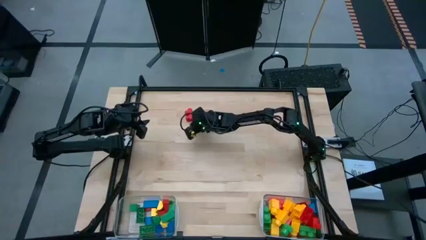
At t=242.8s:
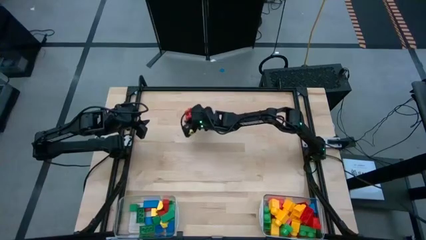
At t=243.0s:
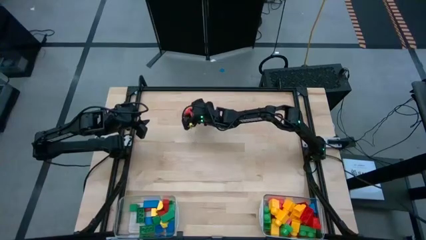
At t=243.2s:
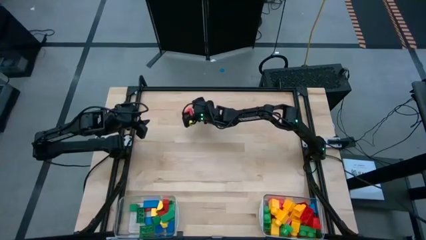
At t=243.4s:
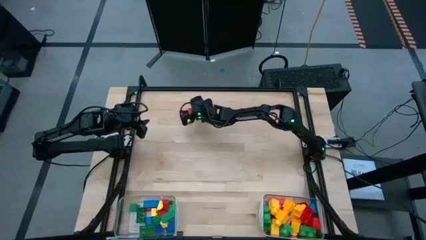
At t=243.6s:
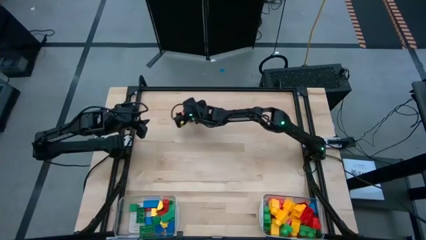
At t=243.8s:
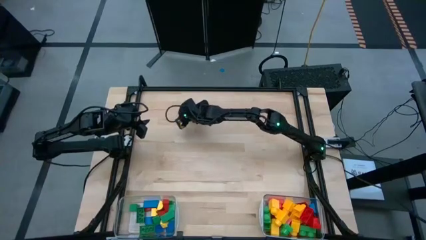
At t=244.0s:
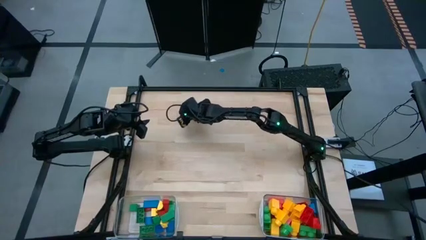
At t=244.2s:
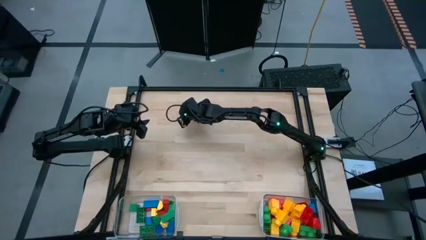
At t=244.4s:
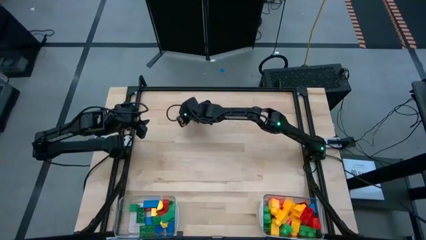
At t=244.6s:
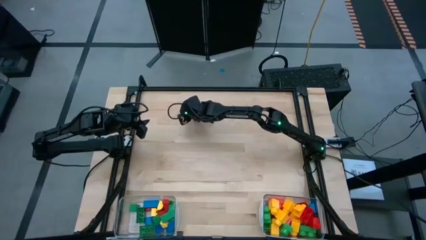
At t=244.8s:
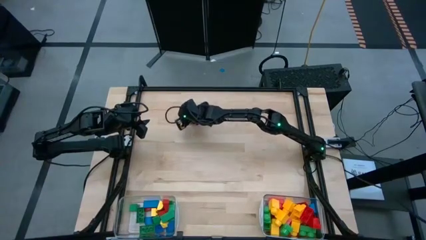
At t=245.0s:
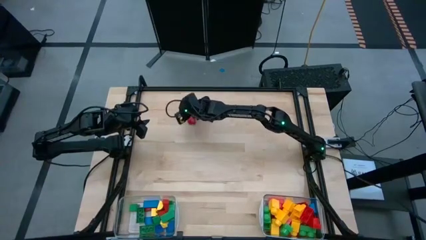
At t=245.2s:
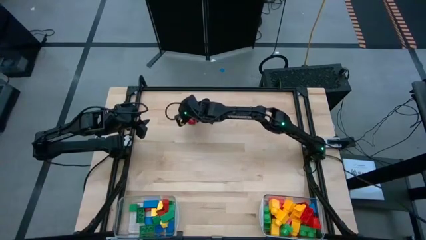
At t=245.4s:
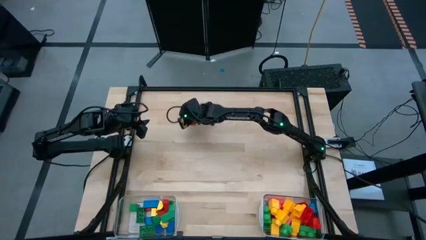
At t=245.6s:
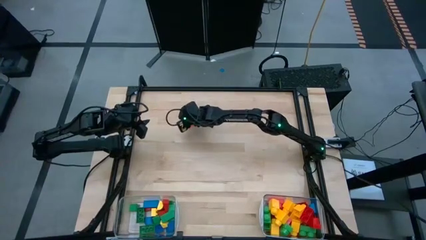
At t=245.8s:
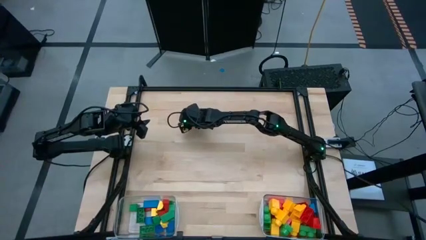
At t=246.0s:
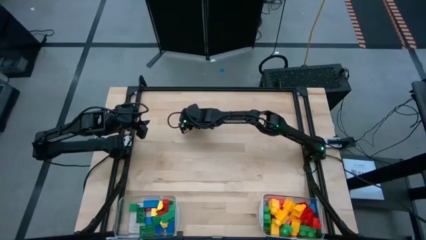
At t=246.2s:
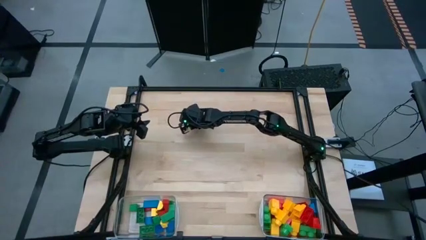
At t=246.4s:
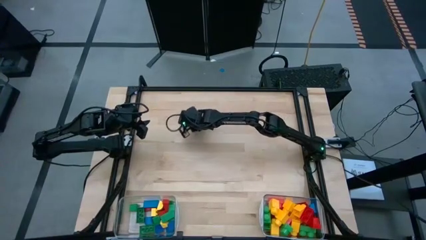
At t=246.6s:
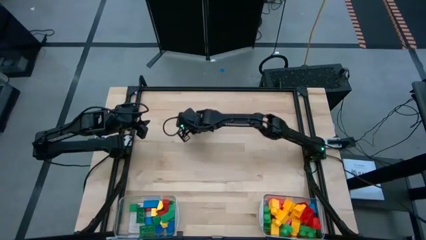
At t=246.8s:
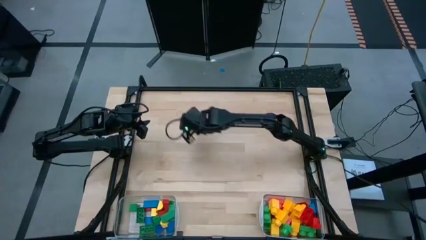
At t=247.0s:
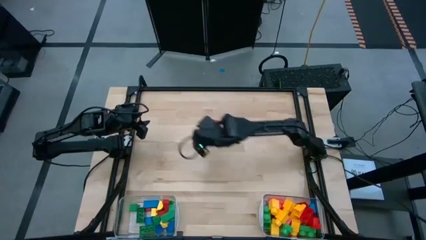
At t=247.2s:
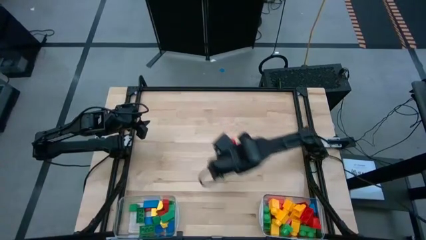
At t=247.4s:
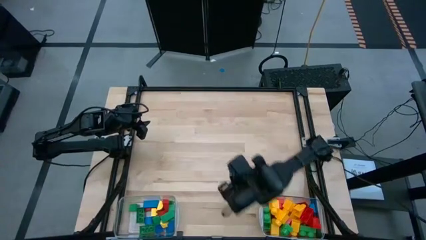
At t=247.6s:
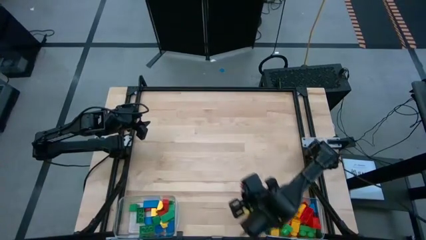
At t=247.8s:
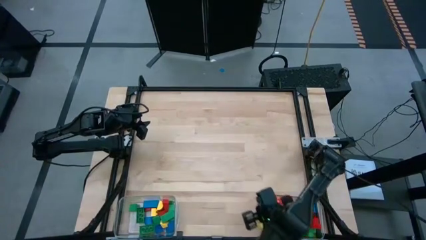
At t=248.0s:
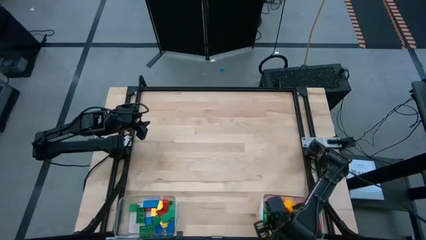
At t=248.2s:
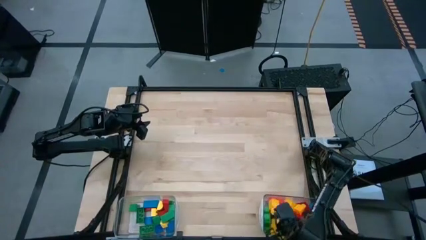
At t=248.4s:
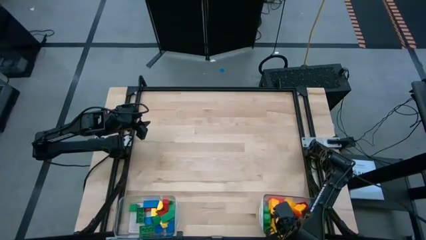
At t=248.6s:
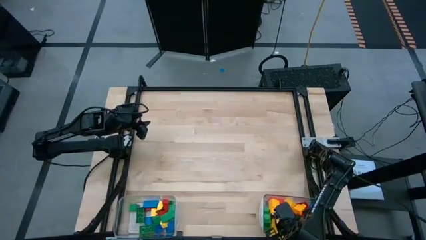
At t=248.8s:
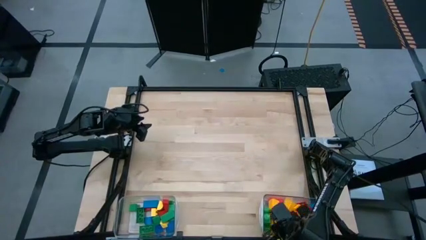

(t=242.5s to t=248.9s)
Task: Sort blocks by size
Put the red game piece into the right transparent bin

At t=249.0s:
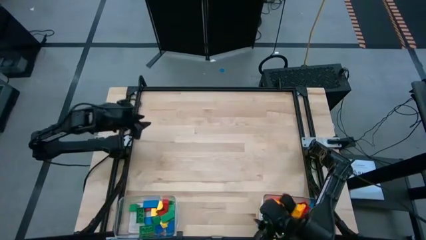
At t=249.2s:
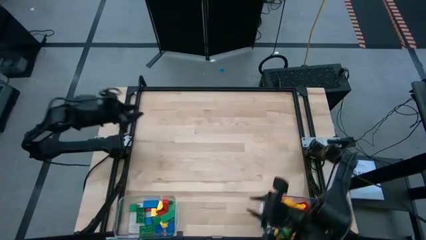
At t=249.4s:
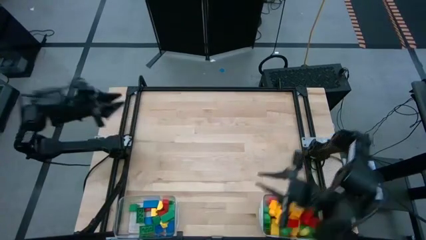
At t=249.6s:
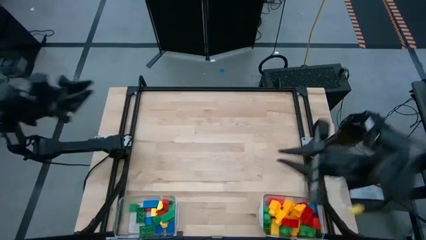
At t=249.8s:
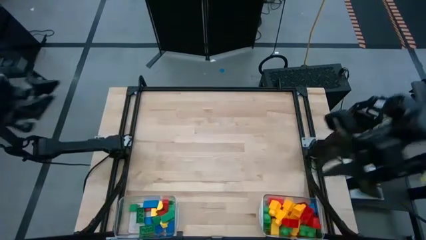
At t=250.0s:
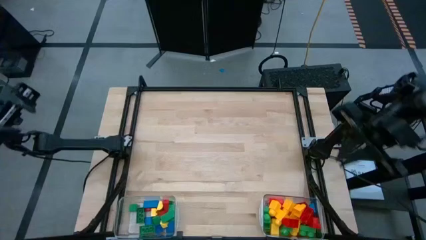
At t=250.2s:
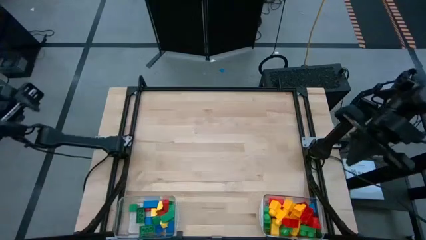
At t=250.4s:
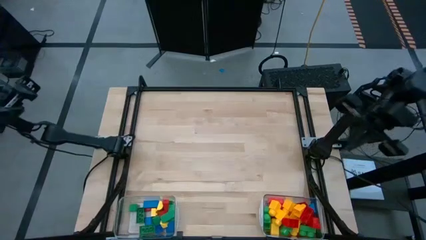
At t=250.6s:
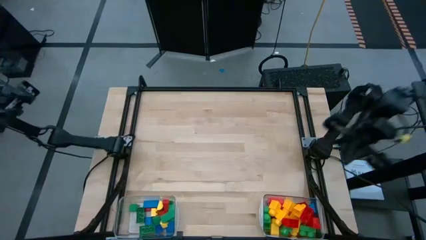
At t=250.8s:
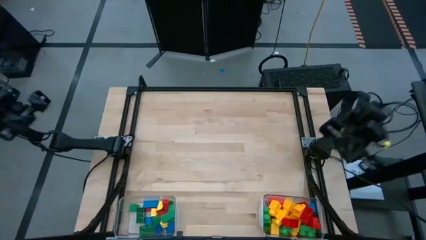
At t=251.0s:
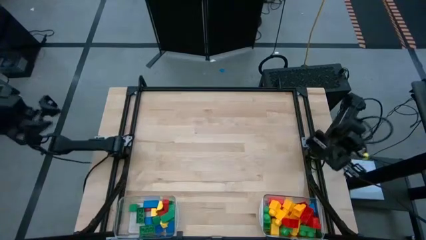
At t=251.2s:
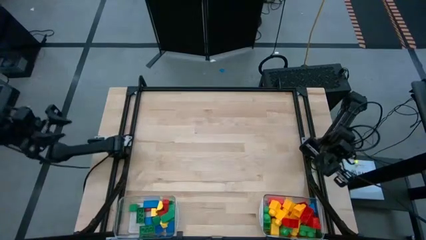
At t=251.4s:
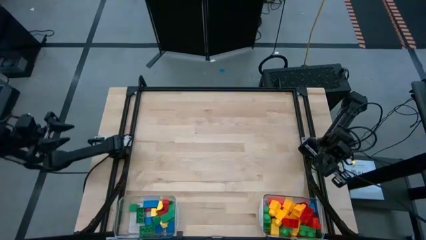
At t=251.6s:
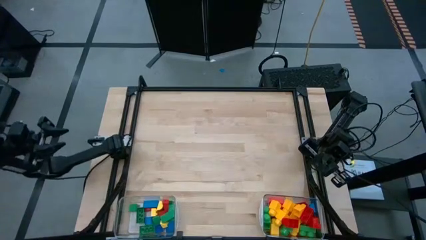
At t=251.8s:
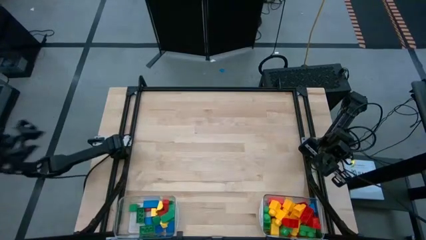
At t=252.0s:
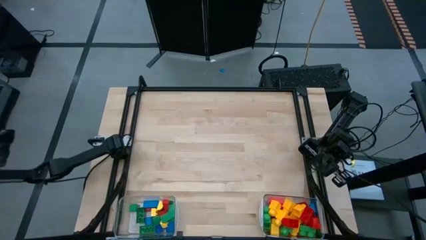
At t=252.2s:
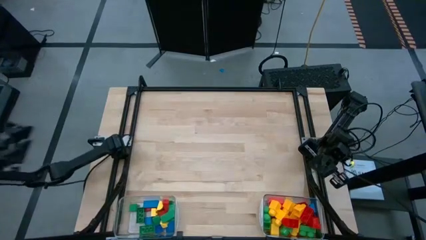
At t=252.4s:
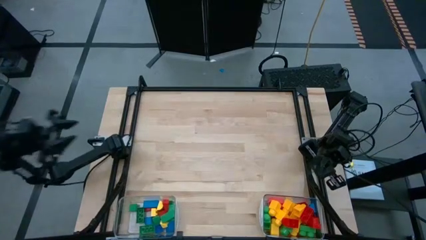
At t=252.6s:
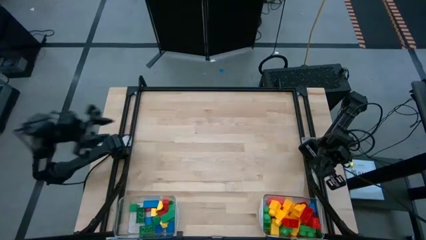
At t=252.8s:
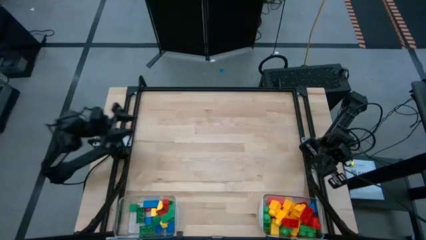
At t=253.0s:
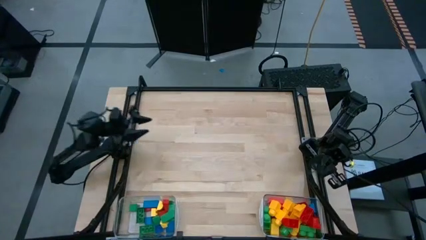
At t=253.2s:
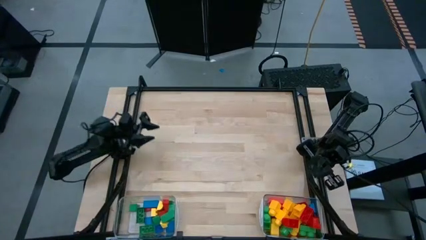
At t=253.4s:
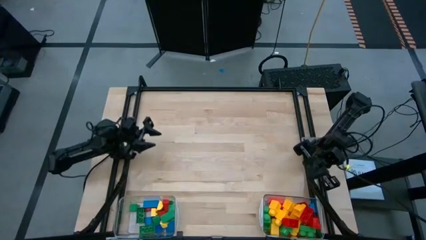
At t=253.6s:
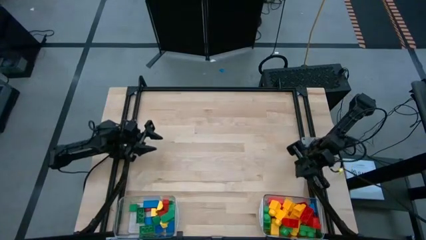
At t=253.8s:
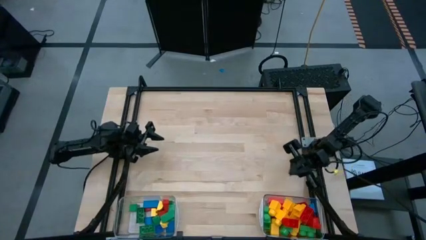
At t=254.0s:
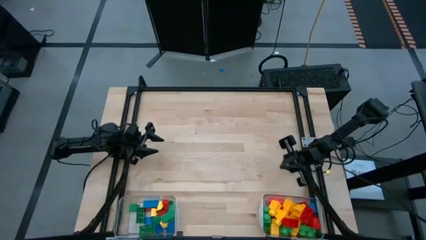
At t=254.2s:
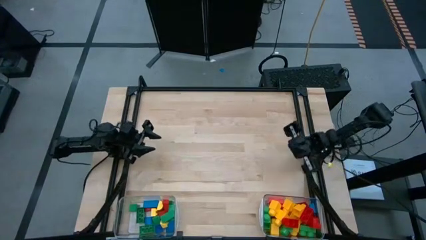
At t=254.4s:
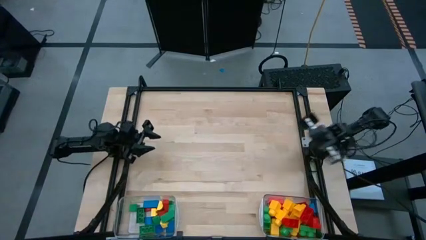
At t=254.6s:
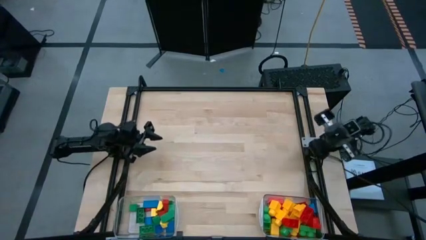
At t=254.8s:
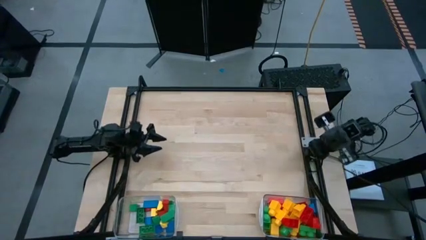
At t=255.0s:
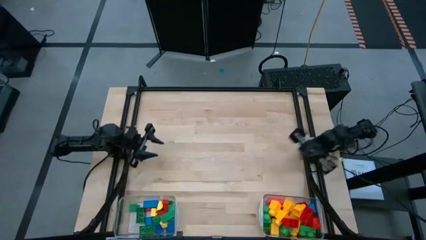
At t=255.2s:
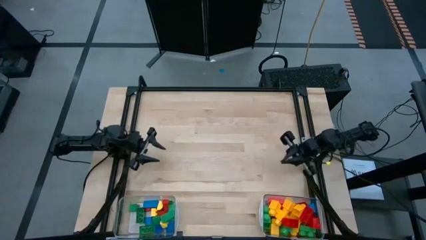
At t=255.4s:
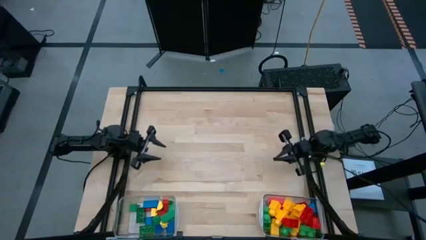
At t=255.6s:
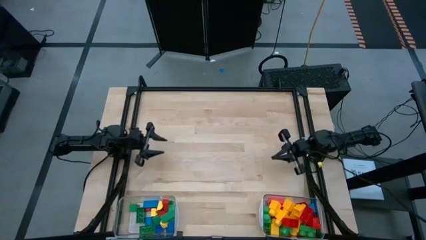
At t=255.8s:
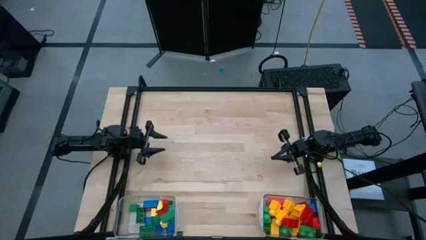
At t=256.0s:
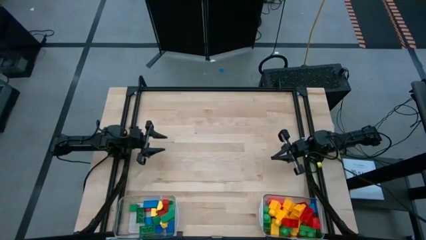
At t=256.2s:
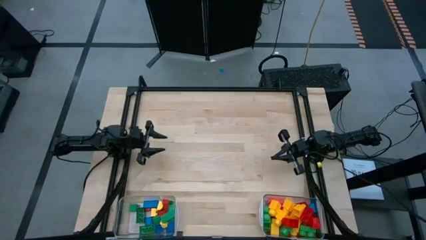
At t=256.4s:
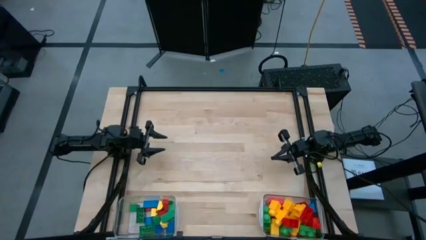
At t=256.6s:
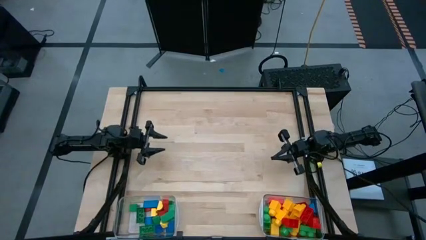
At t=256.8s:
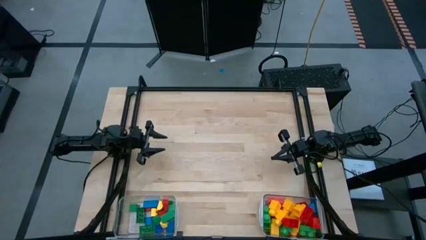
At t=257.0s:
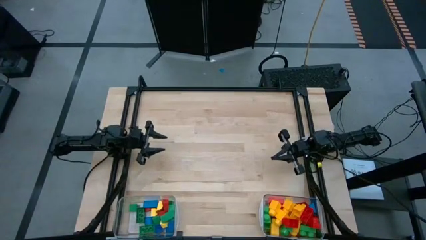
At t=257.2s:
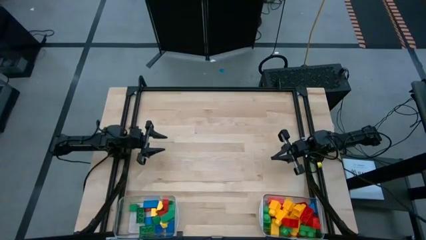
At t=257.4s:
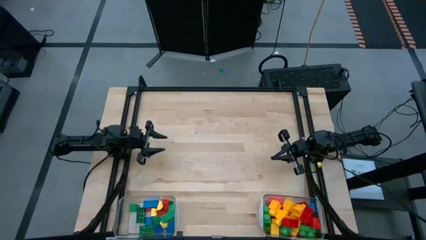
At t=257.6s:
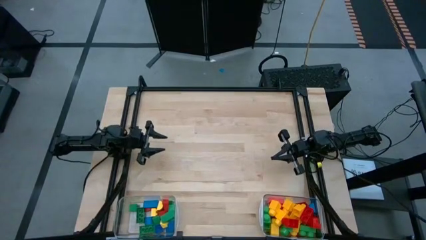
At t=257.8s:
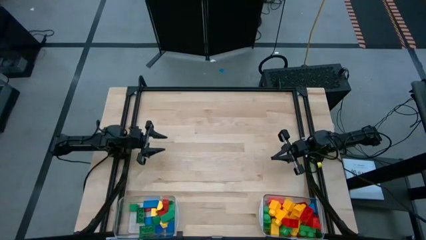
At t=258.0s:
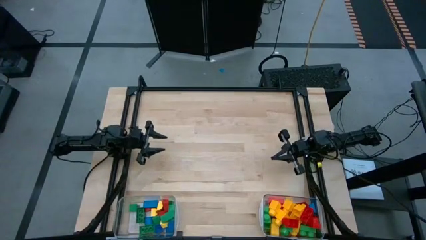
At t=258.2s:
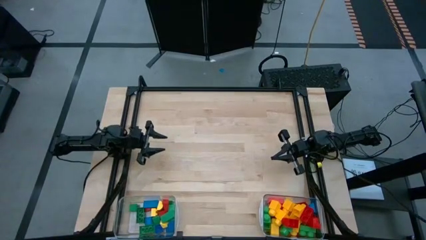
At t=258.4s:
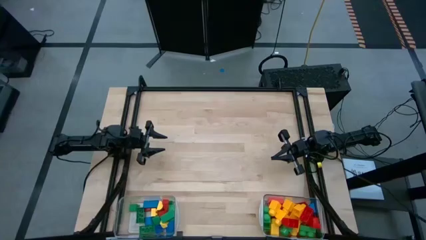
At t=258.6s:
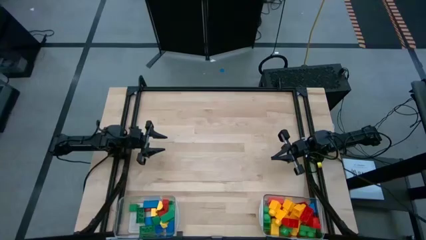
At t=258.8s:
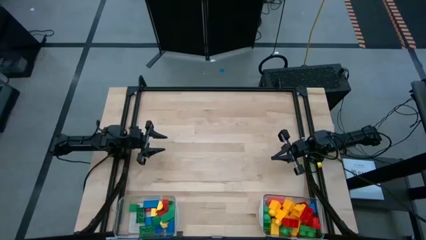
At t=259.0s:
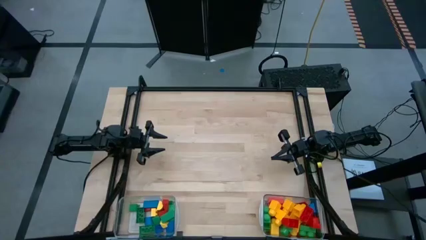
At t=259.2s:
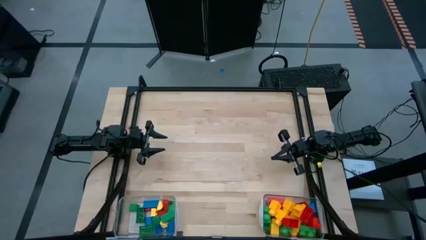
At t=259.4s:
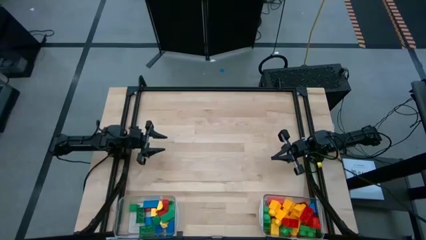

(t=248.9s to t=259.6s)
Return to Home Position
